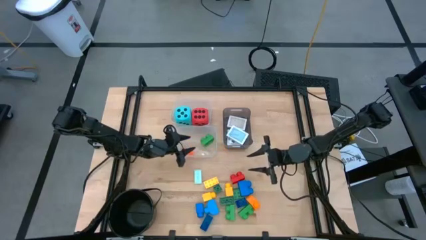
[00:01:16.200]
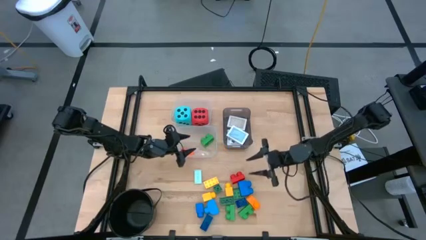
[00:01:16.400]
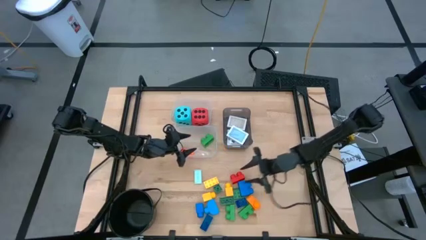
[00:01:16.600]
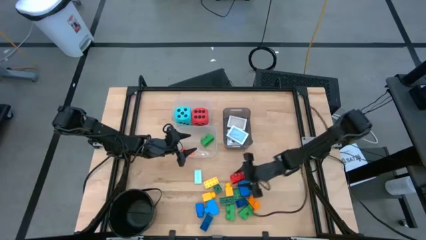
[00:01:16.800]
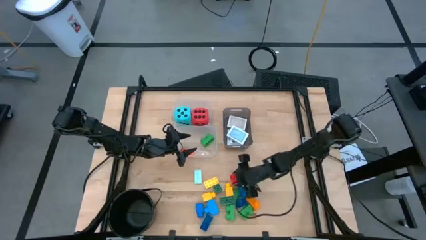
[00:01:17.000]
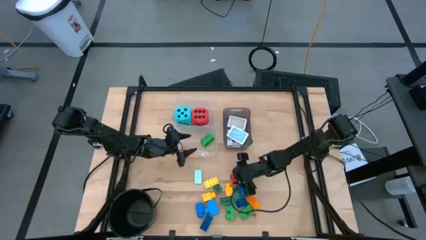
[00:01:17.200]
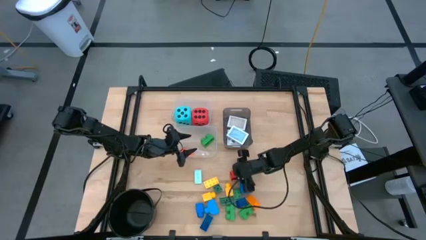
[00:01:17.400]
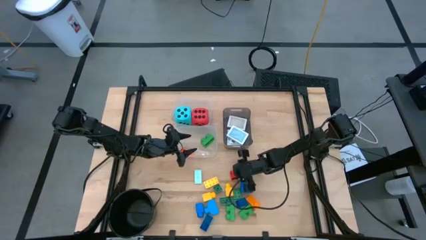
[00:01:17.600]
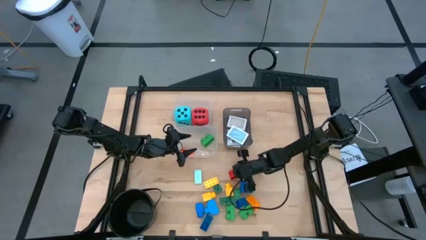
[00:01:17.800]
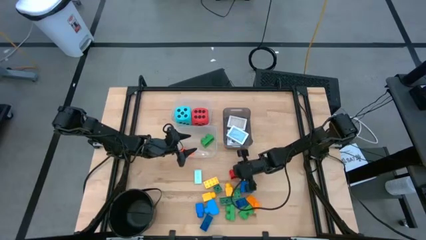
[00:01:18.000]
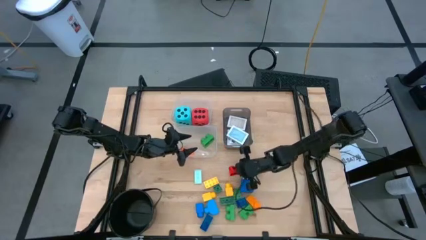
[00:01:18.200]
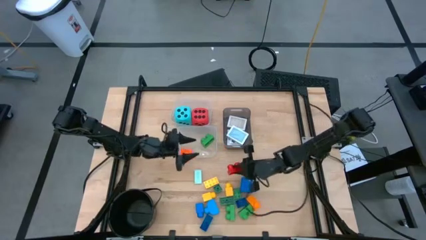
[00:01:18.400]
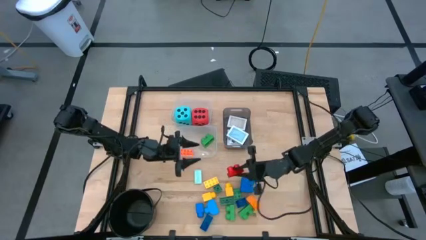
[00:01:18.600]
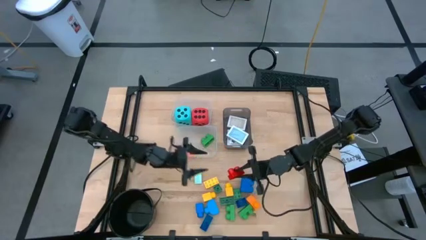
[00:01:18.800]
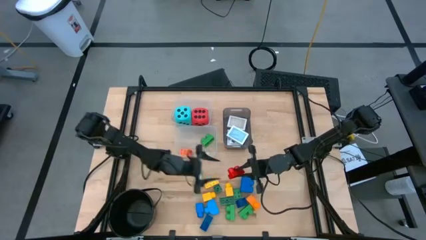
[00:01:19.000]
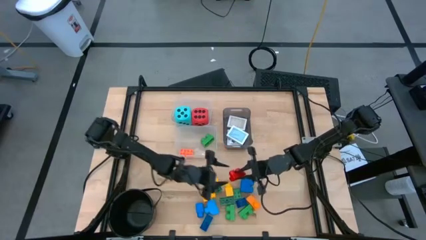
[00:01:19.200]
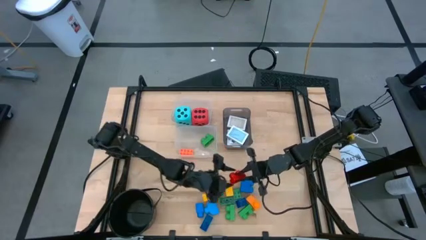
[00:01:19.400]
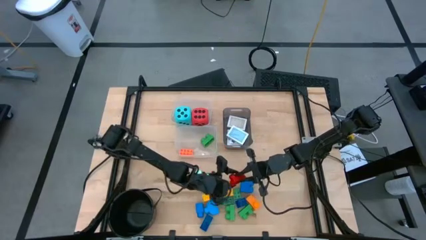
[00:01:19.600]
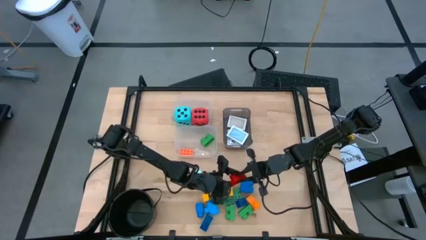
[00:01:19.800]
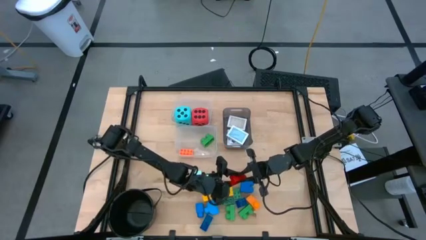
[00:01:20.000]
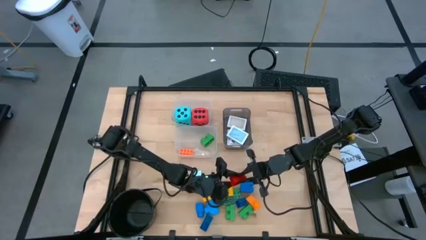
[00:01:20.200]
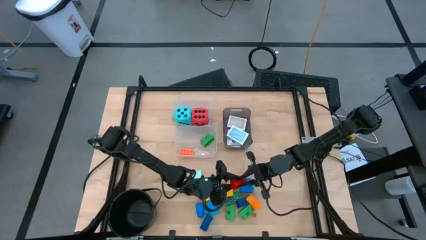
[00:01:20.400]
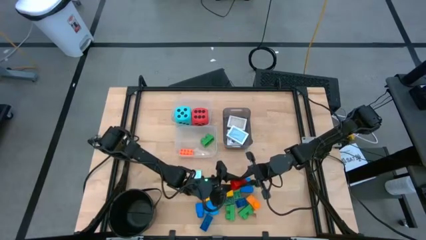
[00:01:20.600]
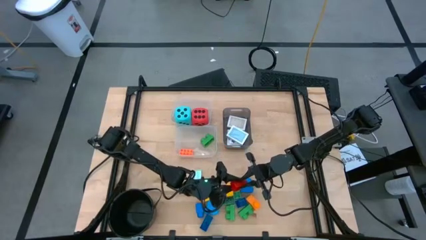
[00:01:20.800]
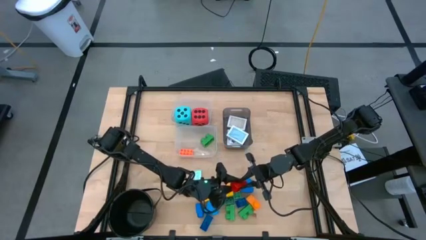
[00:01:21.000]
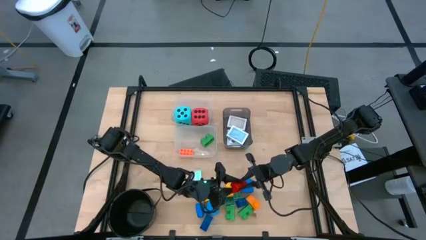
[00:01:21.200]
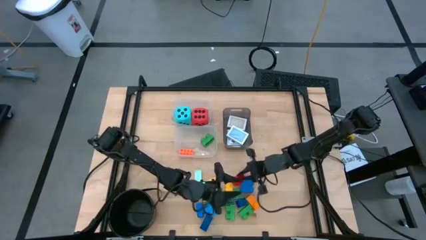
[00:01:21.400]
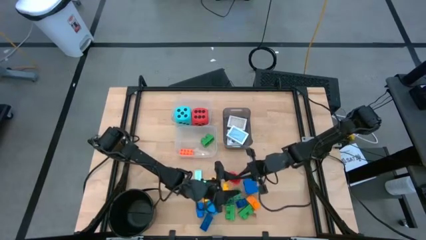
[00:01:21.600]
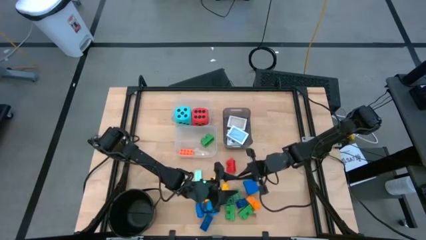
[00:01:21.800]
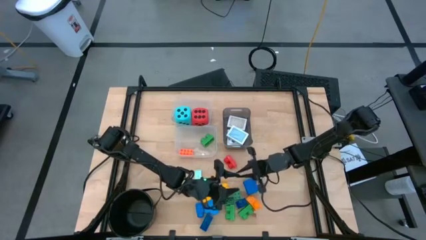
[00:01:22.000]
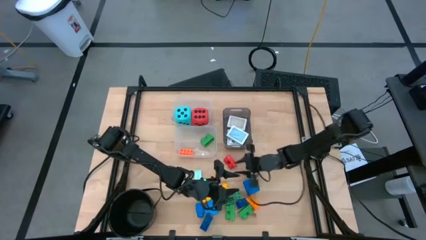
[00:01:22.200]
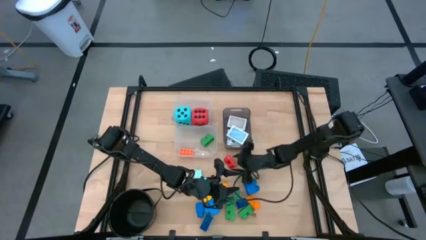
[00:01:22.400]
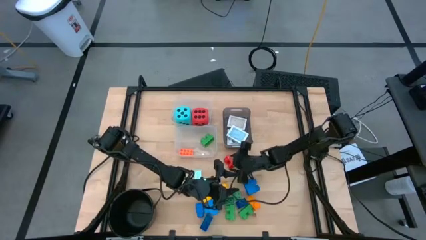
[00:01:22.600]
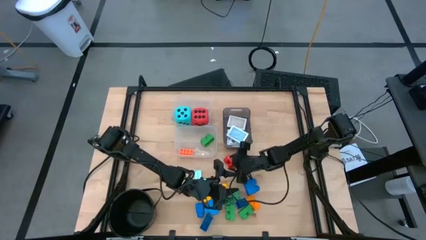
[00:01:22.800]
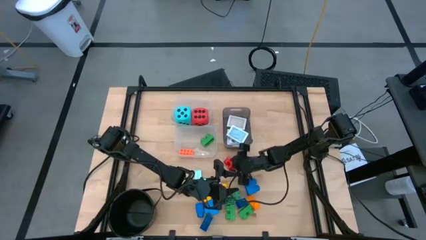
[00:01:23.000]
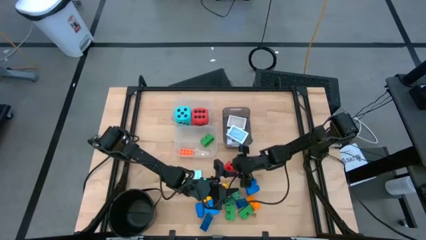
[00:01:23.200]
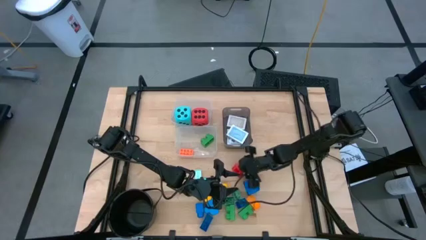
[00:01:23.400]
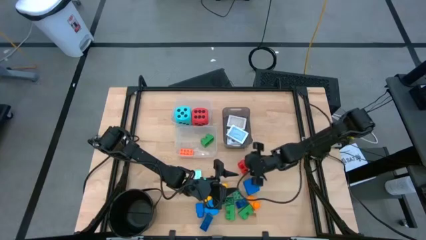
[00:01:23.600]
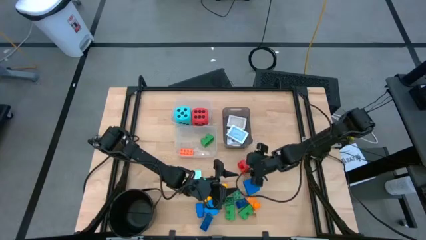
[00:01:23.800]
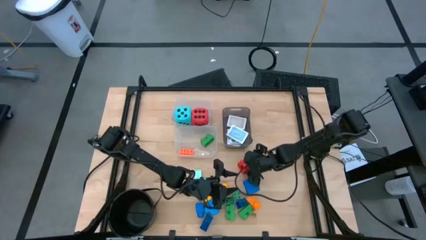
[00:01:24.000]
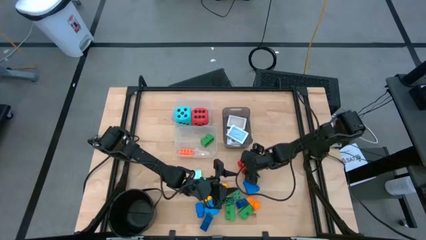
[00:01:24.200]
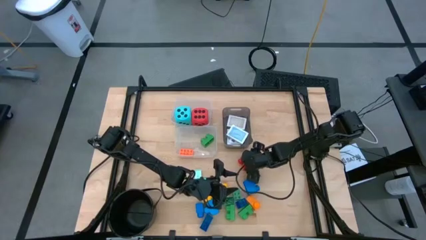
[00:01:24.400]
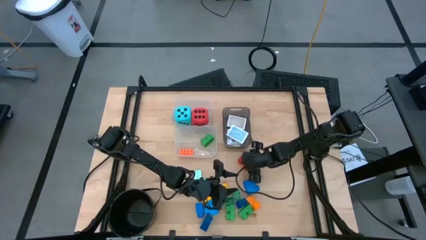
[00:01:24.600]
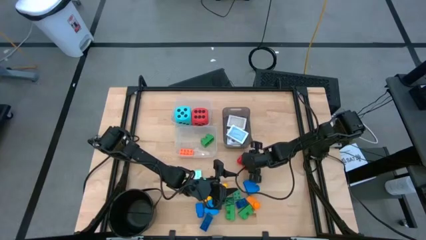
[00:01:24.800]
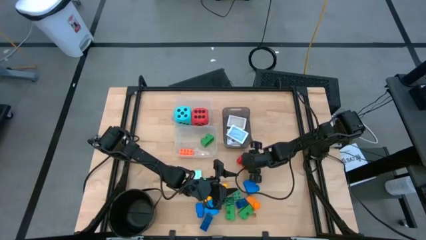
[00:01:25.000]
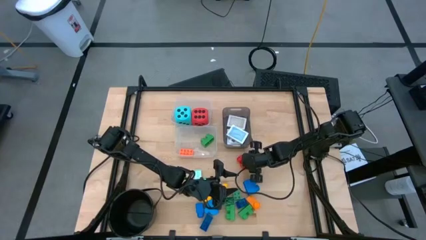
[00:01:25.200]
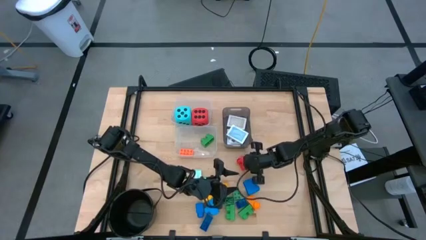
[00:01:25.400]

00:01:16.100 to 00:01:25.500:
Task: Pick & Place Toys
Put the red game piece into the bottom transparent bin

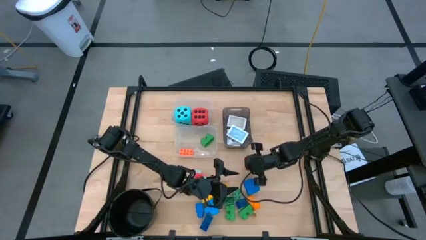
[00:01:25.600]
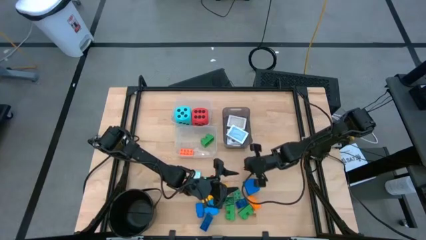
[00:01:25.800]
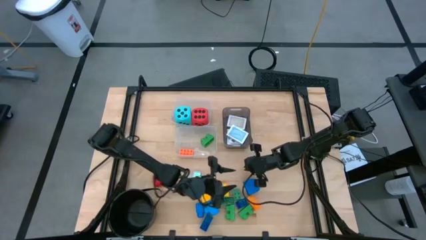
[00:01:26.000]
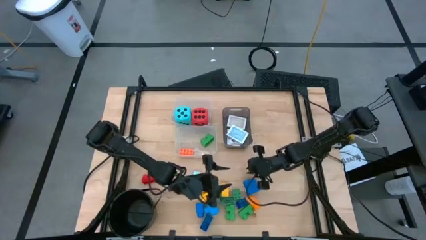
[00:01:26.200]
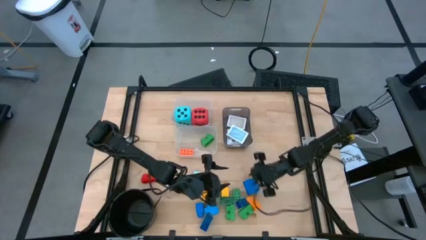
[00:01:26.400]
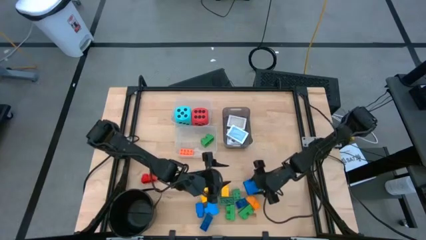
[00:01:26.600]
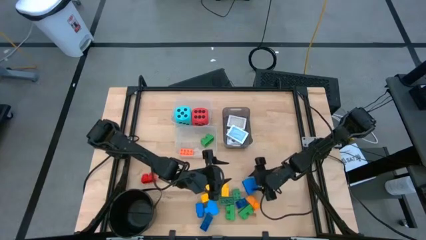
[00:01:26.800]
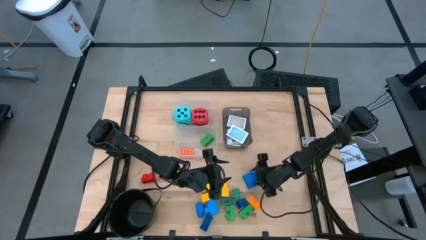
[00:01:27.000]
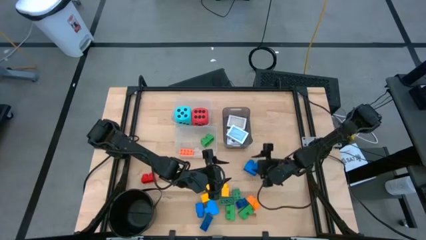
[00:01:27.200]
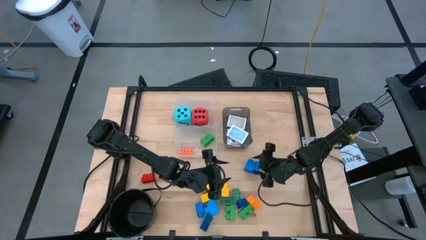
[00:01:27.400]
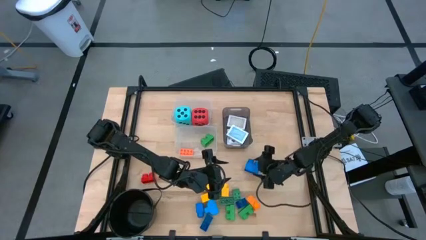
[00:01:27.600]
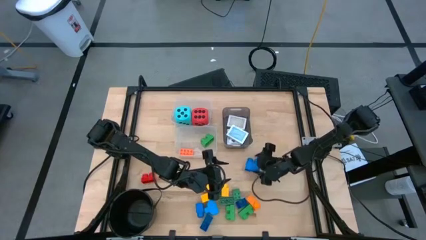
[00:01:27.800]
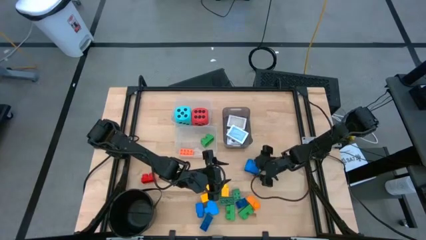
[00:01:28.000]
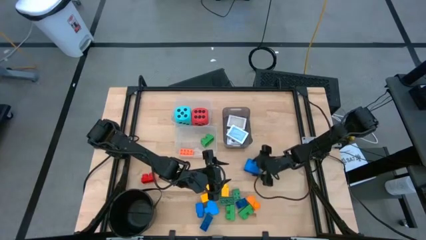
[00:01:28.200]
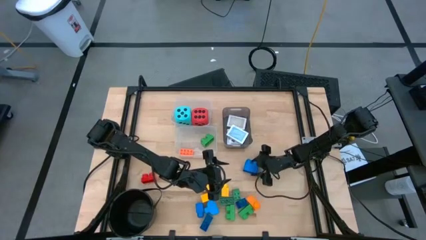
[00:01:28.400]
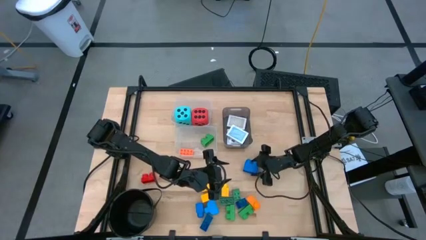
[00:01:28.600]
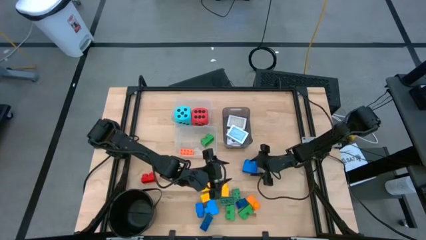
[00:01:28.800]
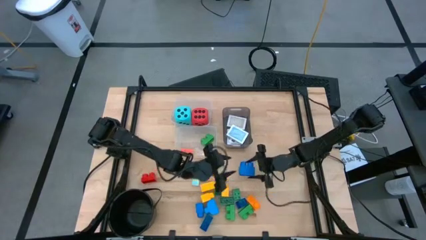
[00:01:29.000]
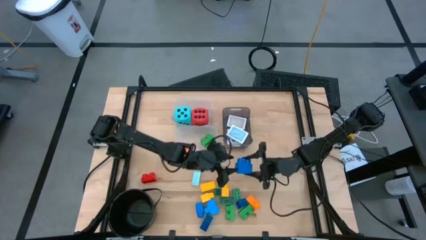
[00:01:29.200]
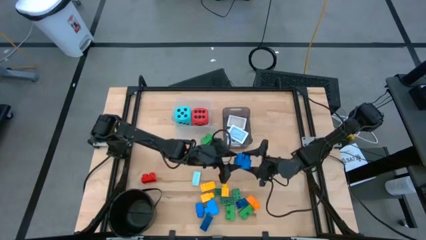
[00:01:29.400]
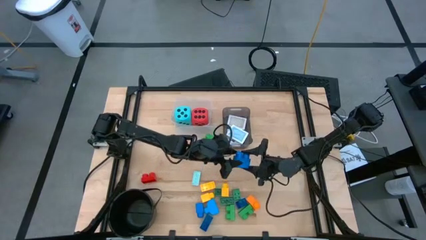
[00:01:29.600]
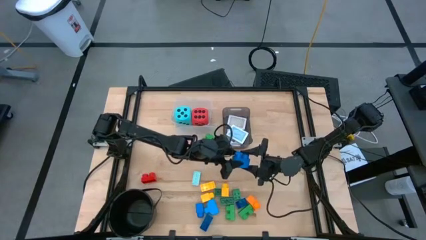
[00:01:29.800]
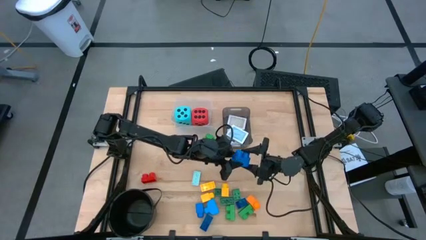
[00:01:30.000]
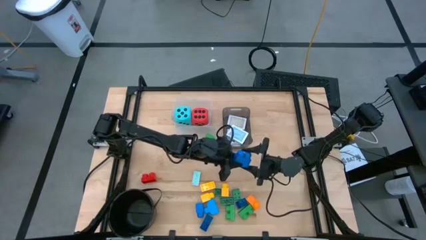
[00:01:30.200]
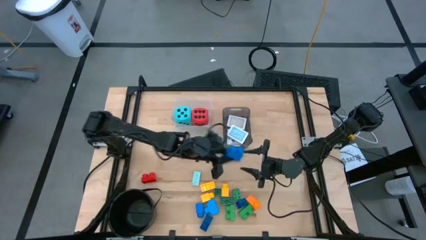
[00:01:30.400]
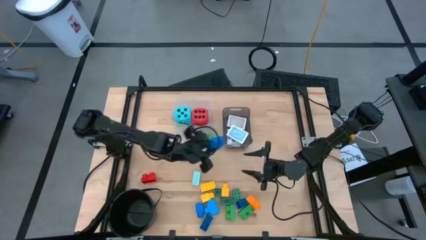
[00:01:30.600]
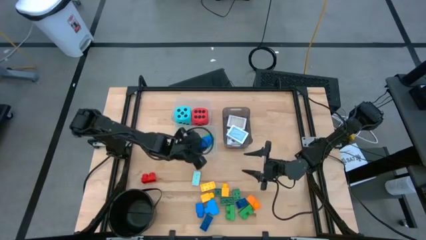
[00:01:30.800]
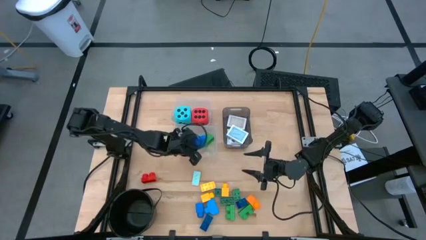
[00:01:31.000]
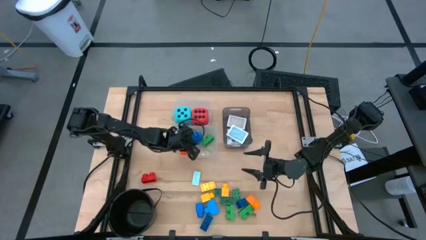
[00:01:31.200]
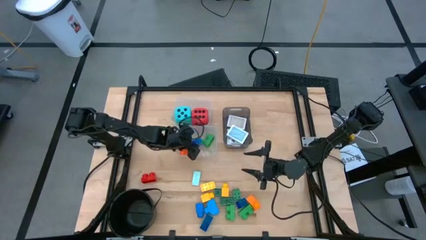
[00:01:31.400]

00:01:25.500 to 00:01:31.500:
Put the blue game piece into the bottom transparent bin

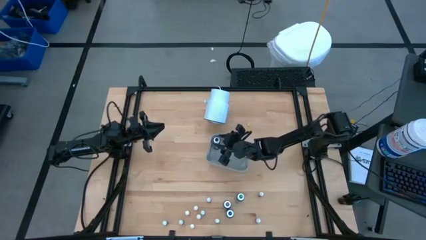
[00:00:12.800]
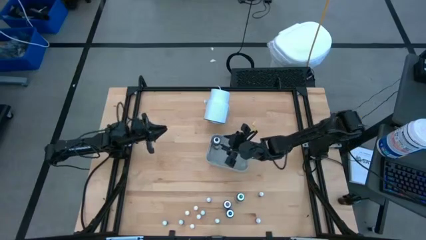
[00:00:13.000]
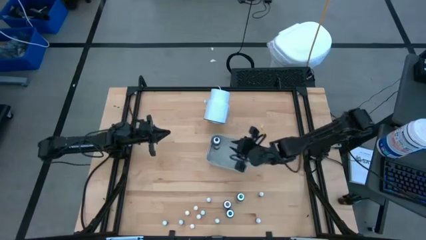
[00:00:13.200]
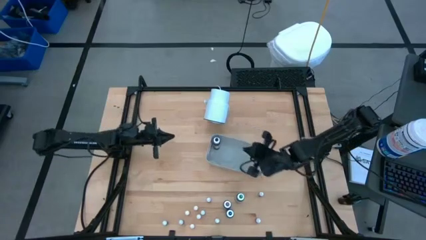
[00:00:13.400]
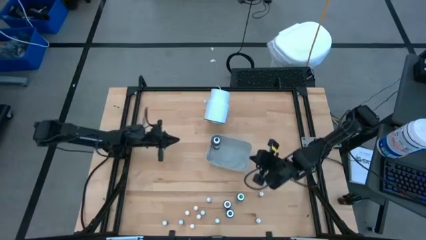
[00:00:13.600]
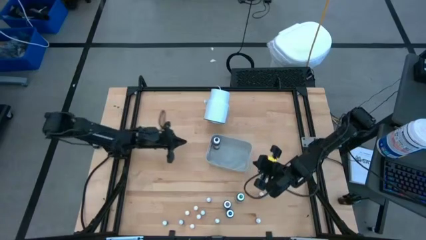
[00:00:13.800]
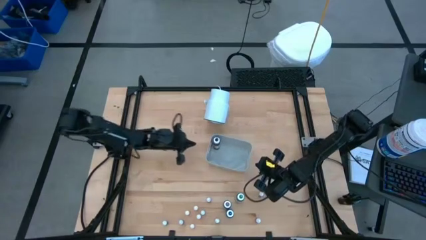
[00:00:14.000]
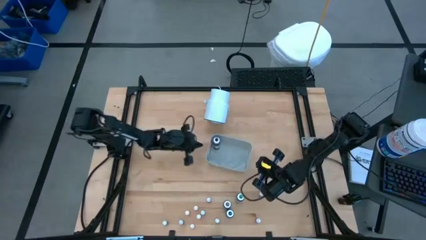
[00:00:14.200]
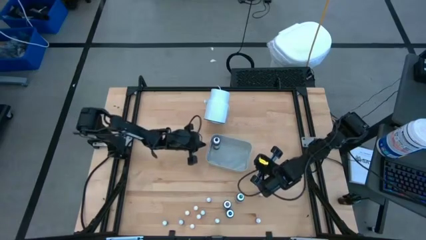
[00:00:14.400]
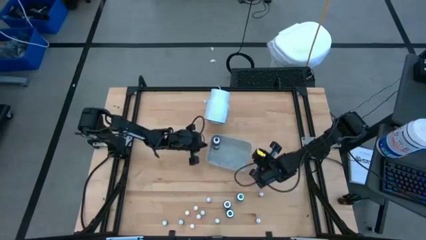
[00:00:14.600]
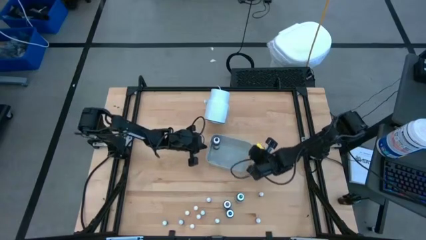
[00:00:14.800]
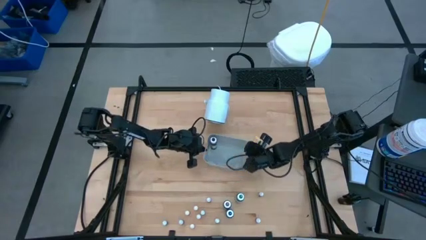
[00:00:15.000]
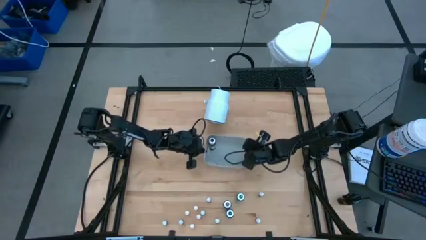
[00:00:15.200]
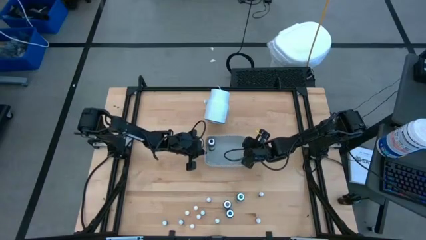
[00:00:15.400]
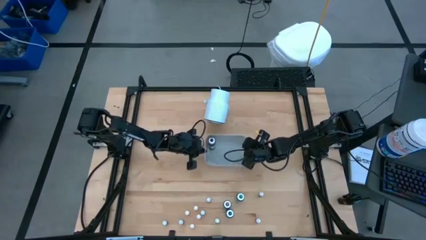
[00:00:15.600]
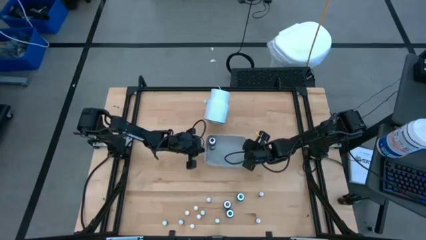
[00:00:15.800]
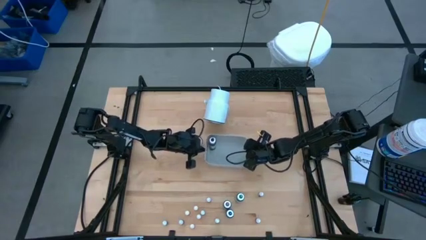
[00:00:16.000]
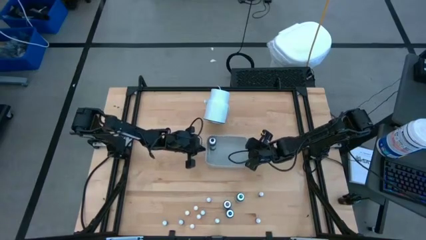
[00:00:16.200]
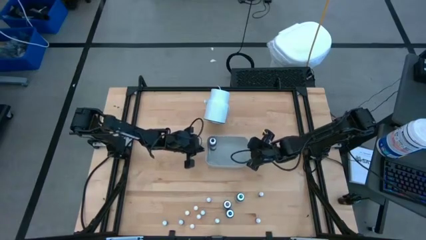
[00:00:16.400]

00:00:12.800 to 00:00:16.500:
Task: Pick & Place food coloring
Adjust the gray bin
